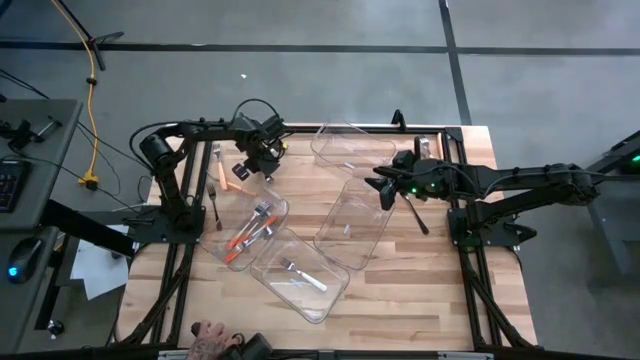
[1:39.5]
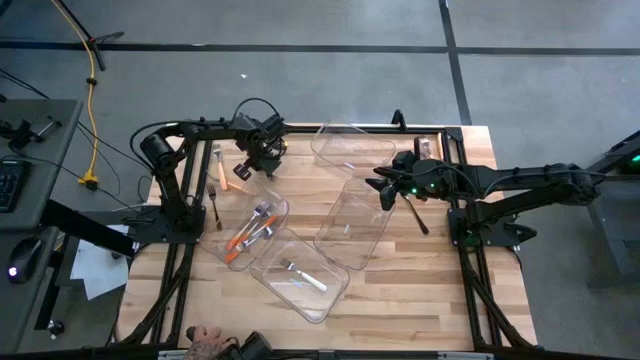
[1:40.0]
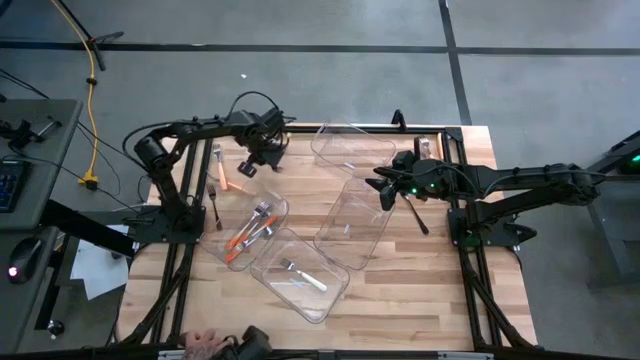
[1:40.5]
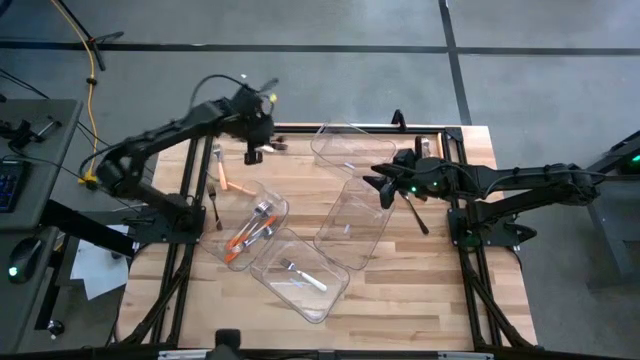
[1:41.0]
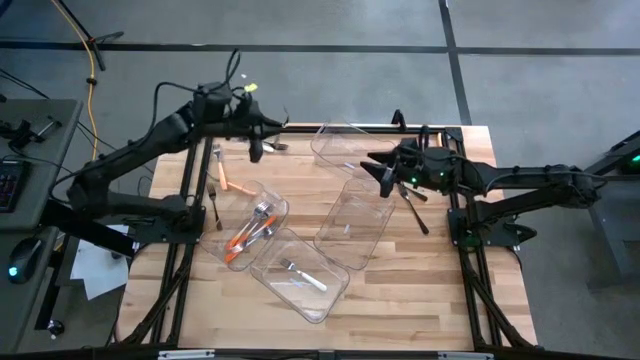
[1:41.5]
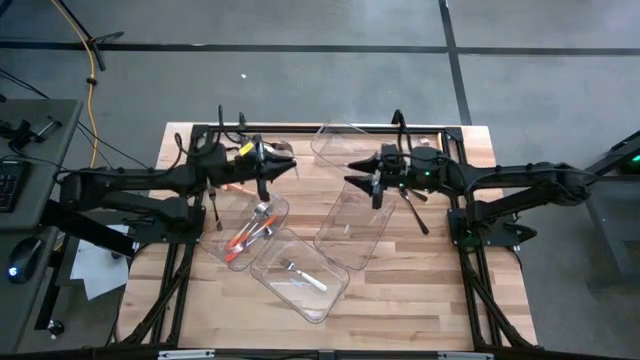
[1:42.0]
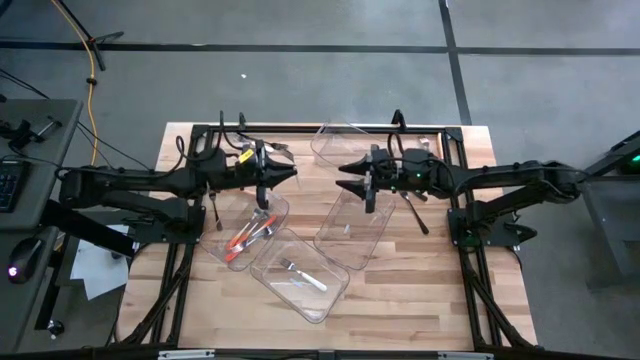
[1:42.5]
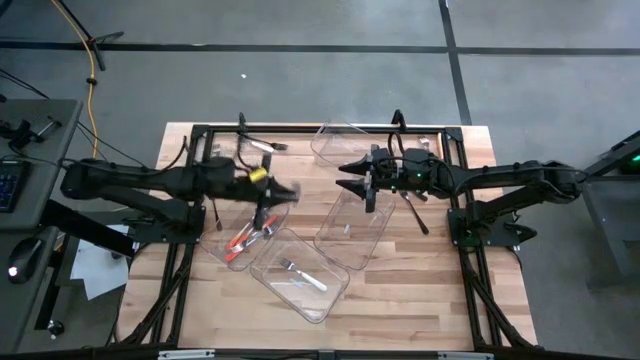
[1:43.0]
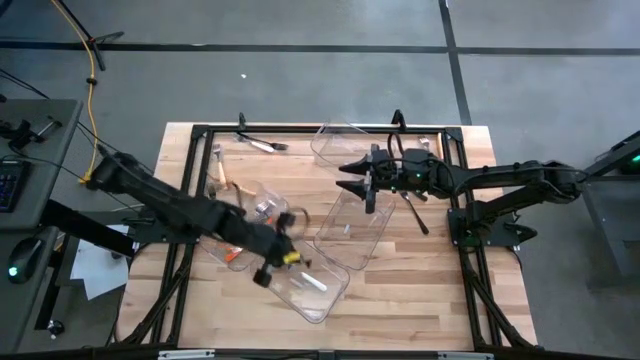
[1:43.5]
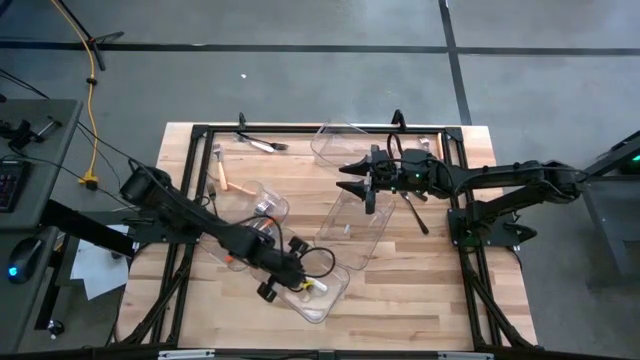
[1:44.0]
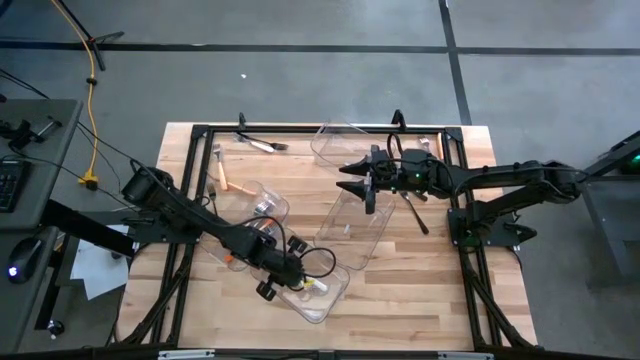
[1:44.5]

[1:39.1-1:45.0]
Task: Sort silverware by color (type)
Put the white fork into the bottom transparent bin

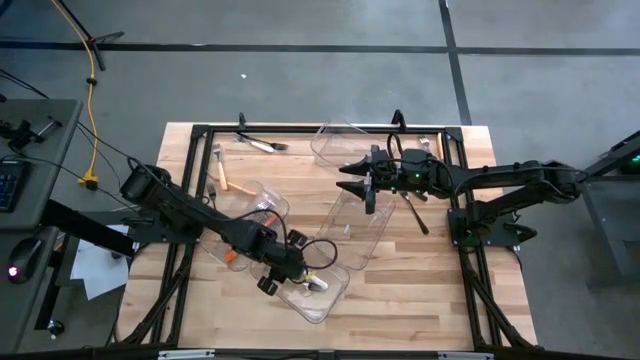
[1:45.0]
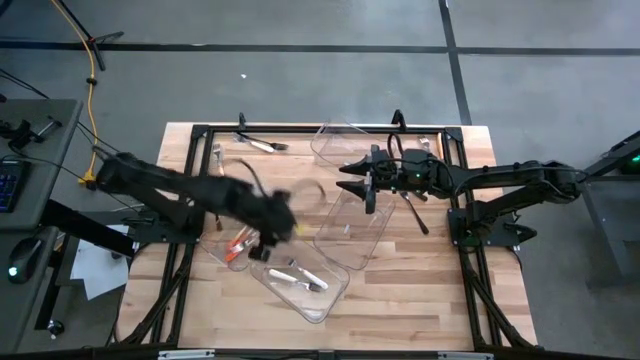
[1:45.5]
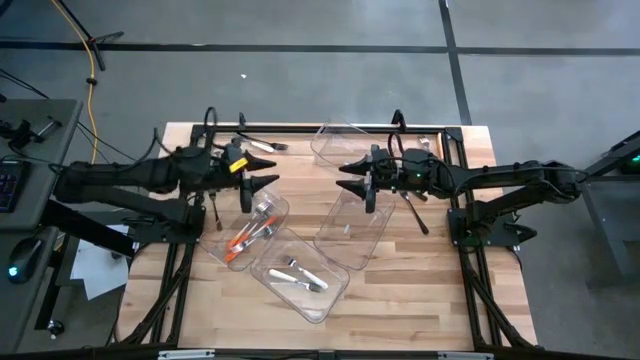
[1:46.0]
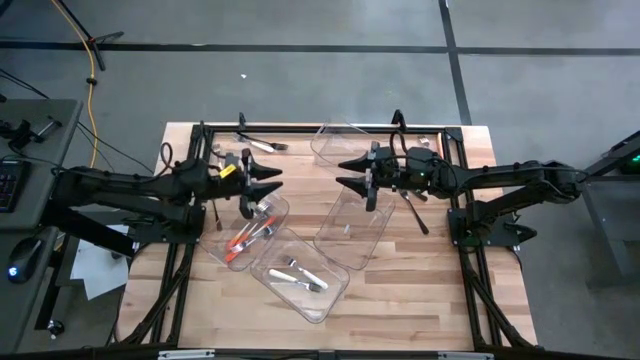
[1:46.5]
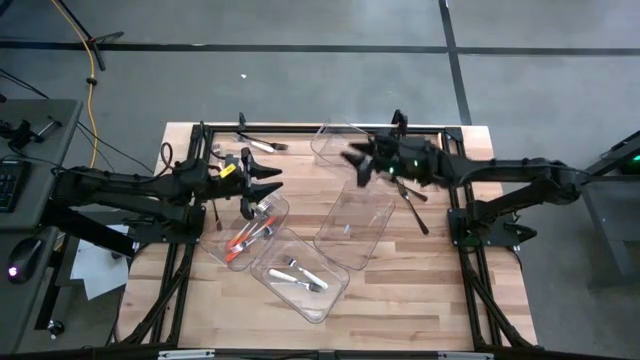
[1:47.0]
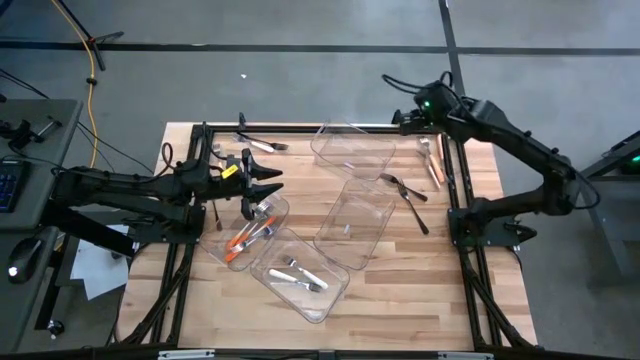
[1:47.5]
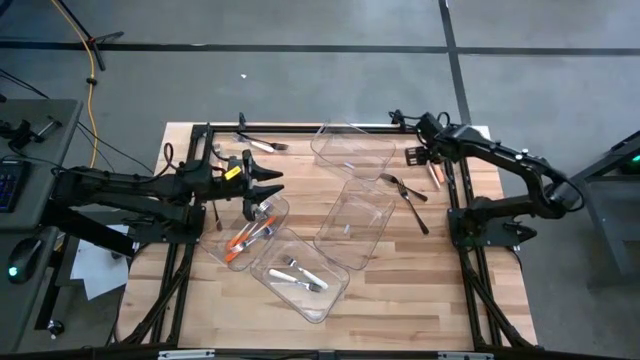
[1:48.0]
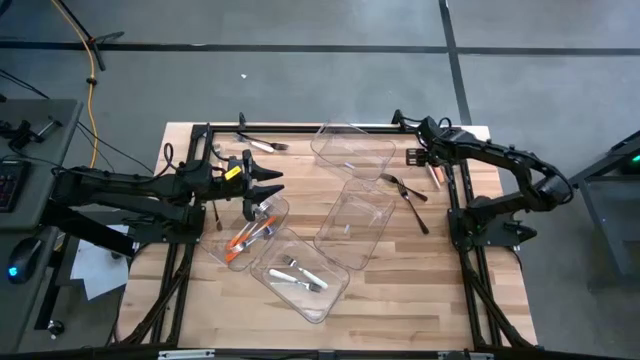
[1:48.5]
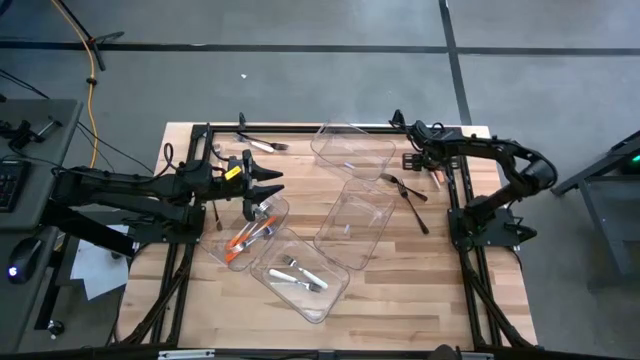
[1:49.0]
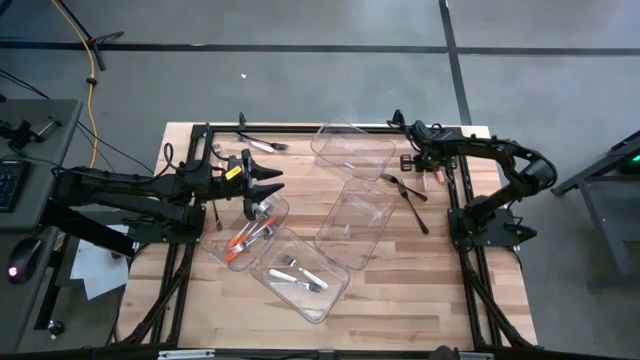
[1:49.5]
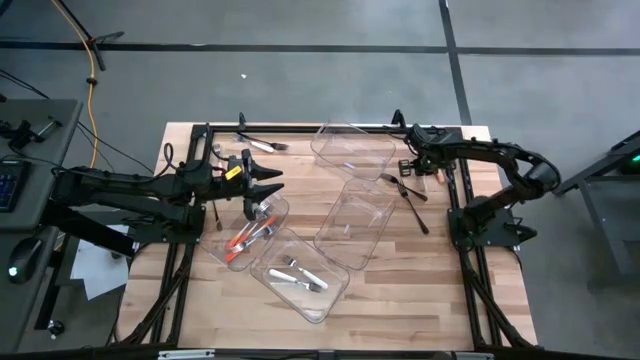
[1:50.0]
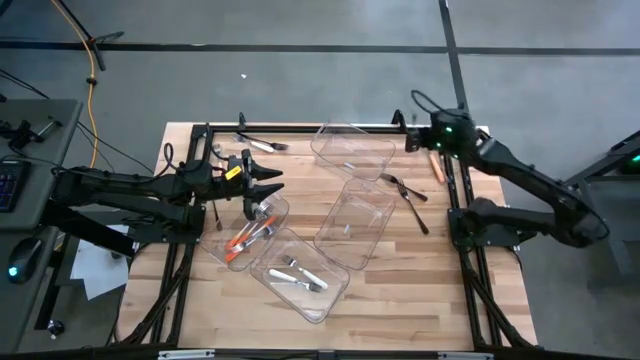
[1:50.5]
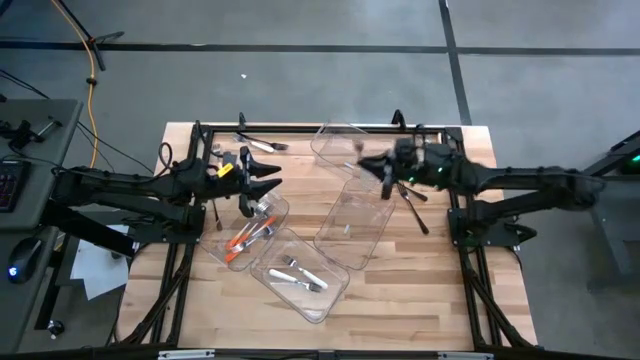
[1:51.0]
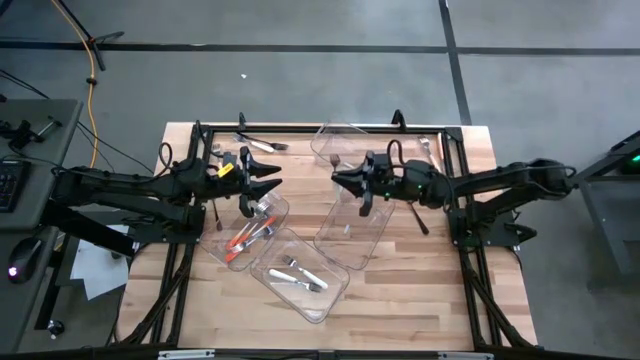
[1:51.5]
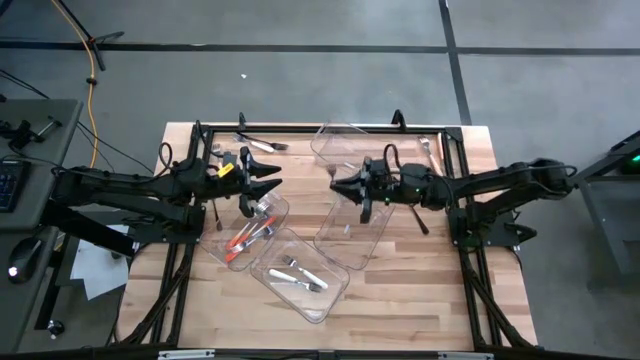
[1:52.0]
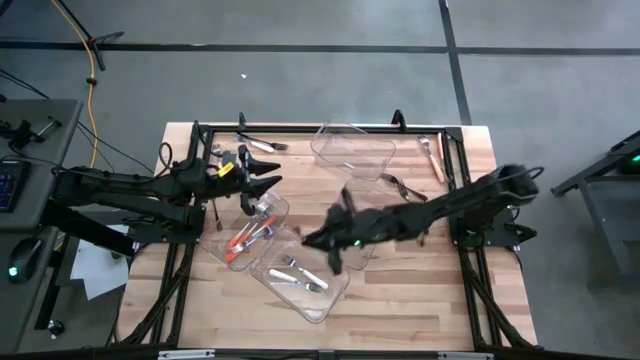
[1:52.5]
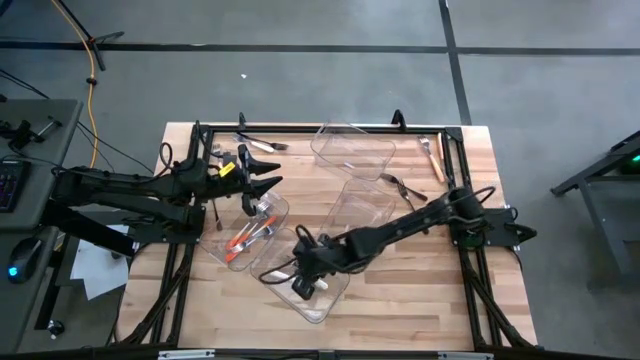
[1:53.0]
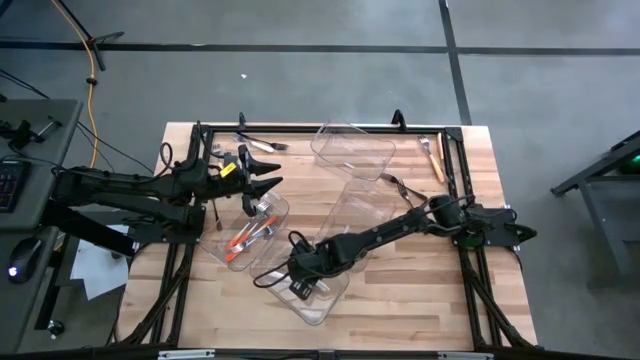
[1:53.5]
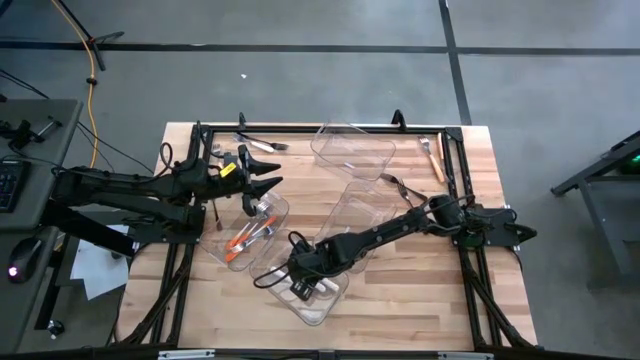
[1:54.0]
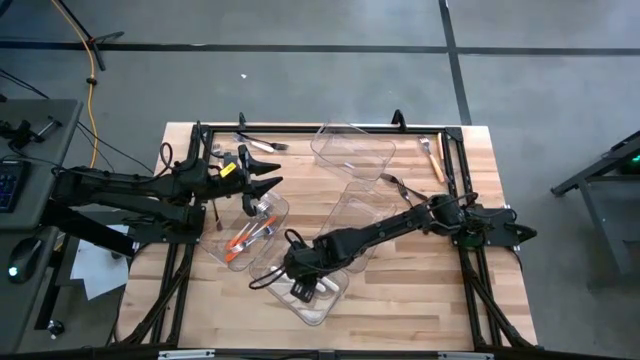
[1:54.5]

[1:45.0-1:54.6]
Put the white fork into the bottom transparent bin

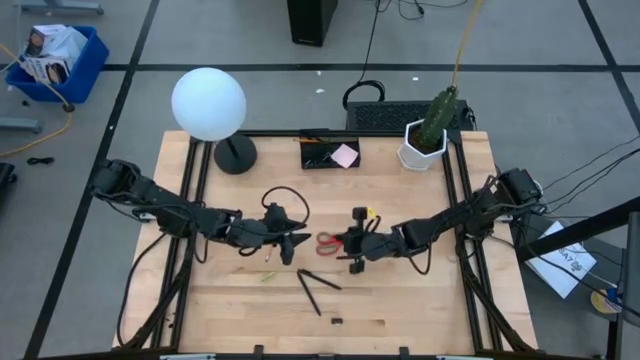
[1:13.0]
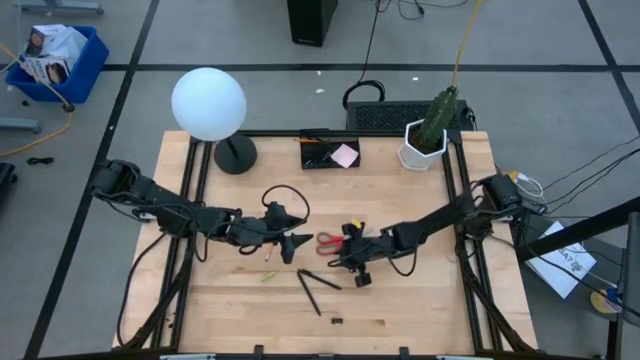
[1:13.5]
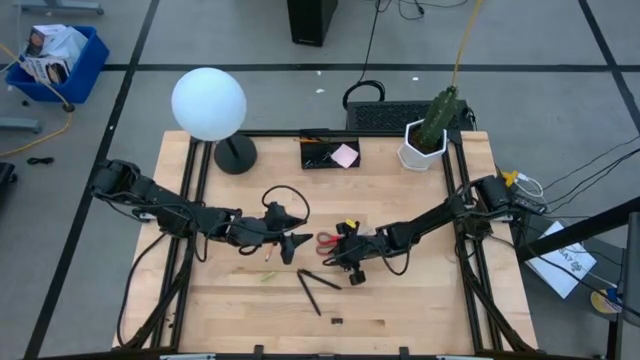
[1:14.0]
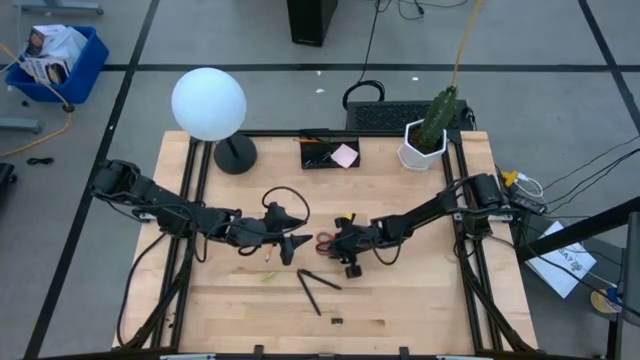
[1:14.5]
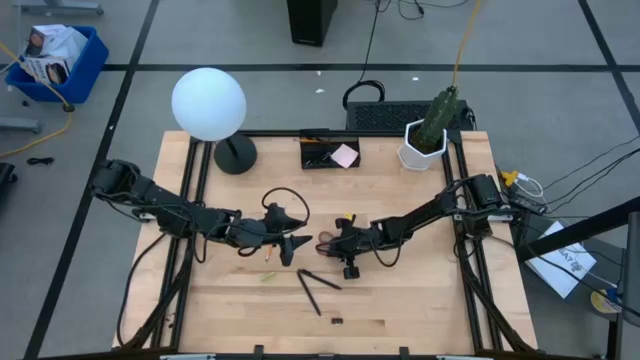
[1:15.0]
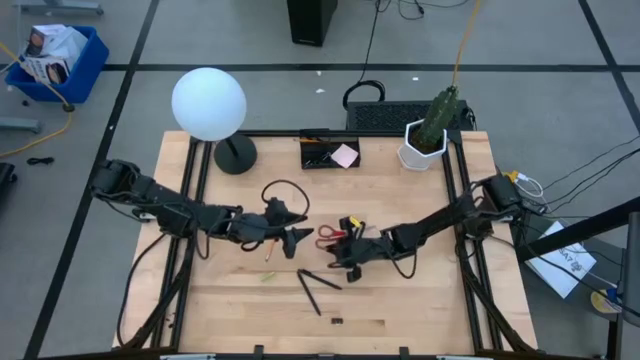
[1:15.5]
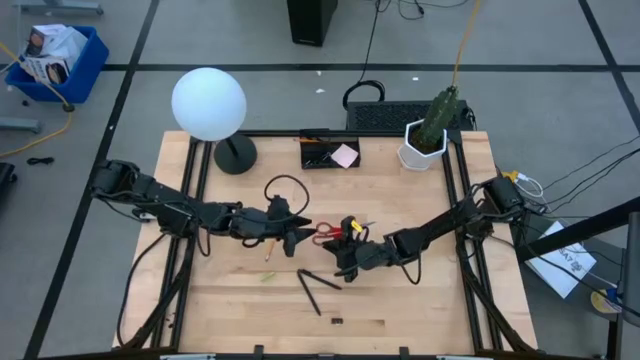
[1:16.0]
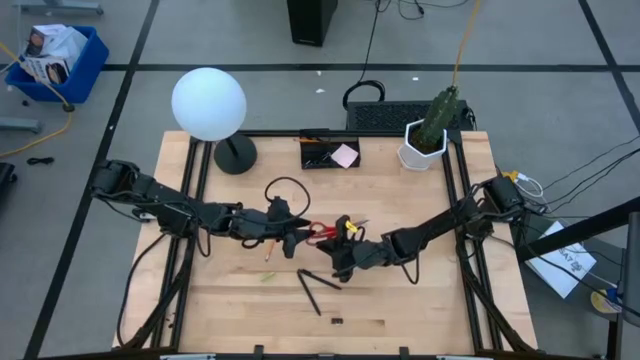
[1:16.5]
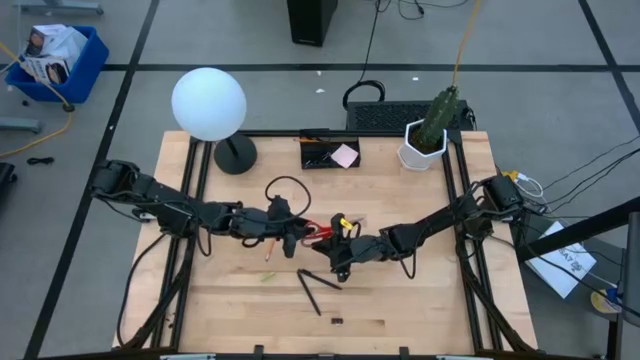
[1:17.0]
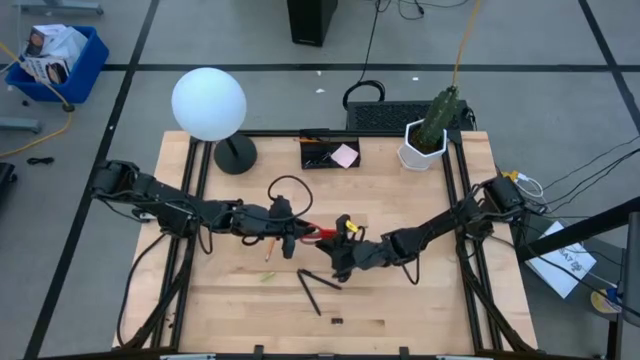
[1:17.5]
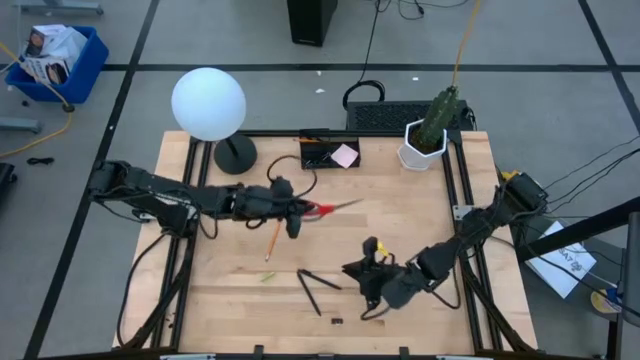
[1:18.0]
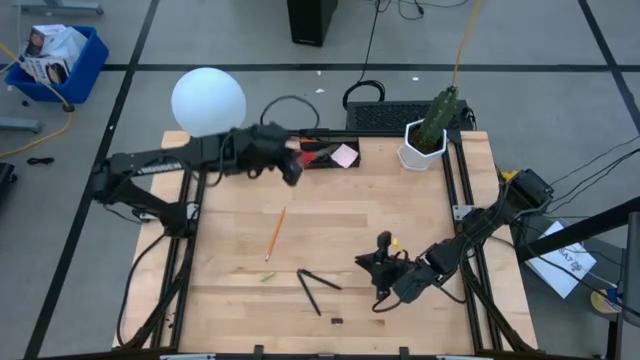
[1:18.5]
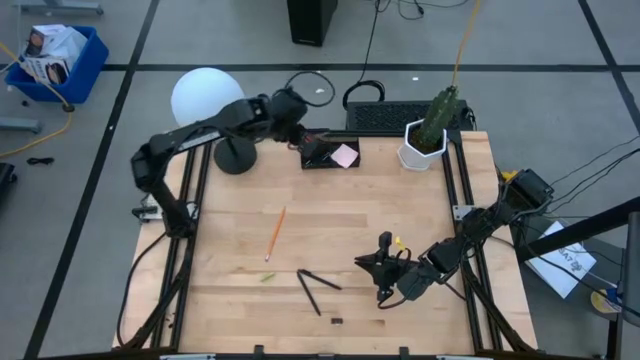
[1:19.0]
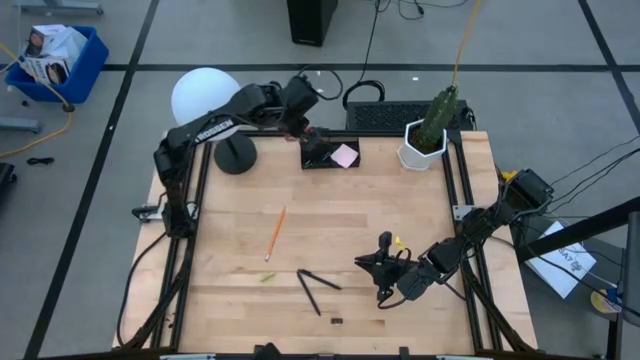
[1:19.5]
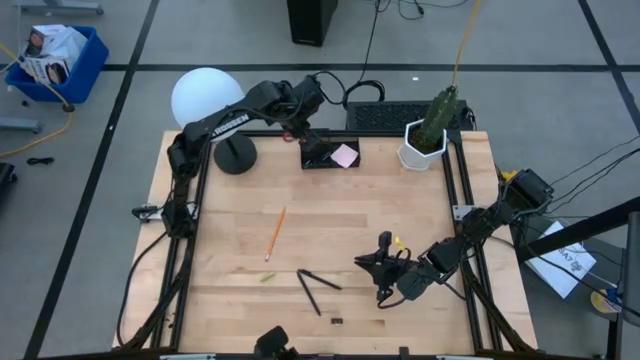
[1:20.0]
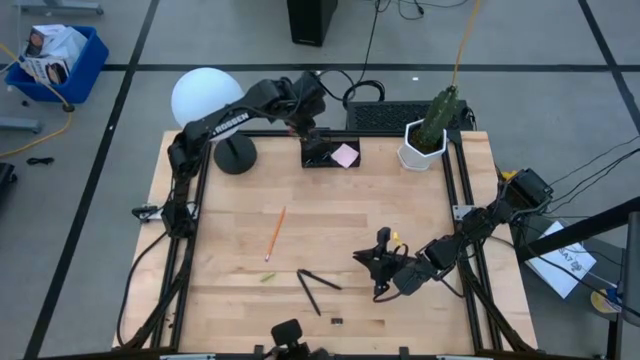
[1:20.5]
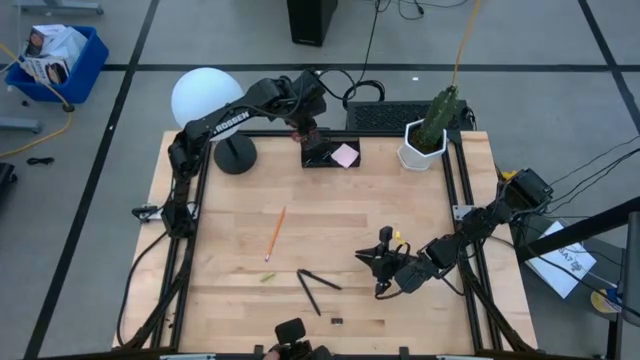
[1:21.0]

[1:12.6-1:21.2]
Task: Pick and place office supplies into organizer
Put the scissors into the desk organizer
